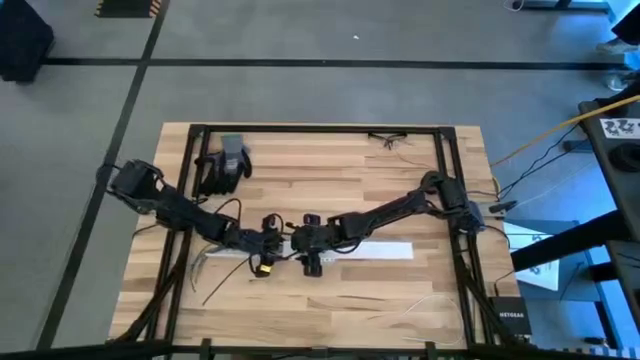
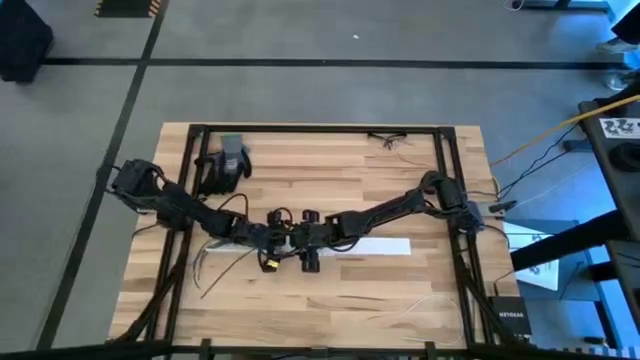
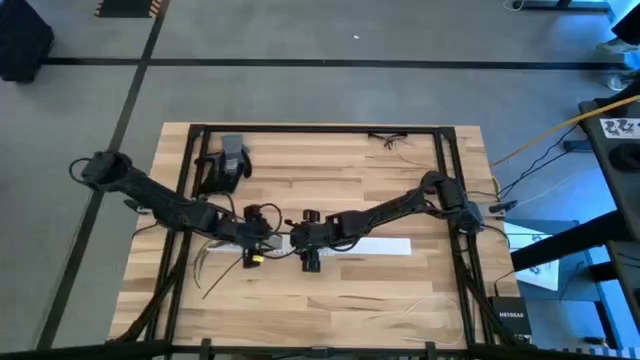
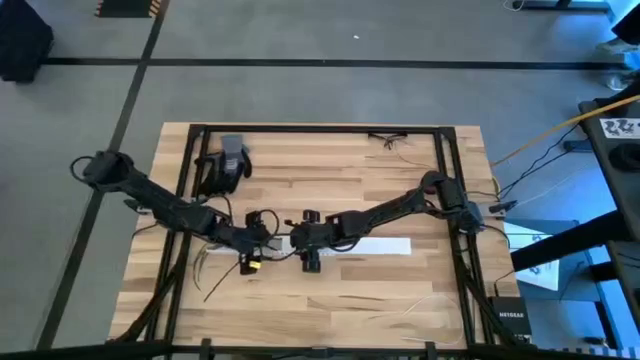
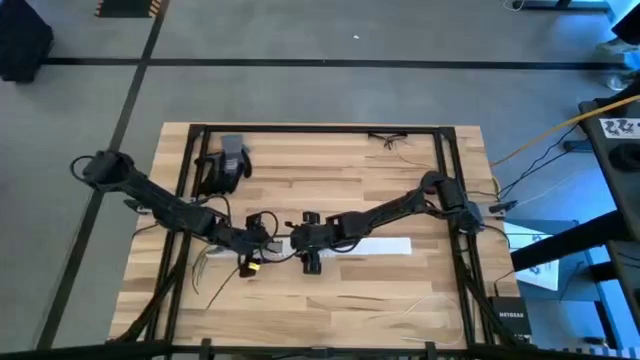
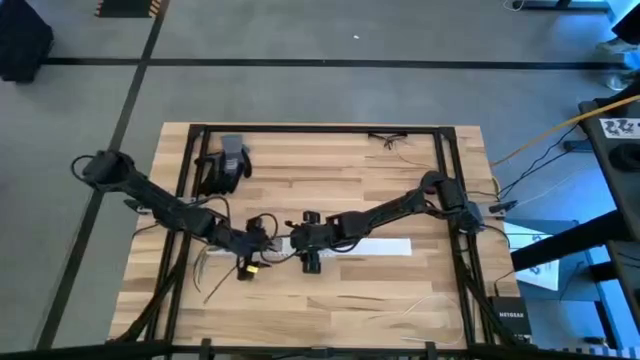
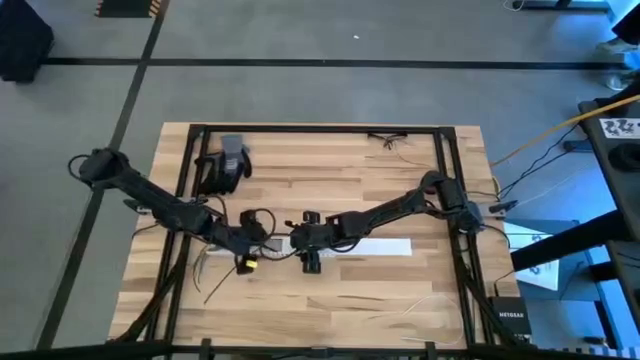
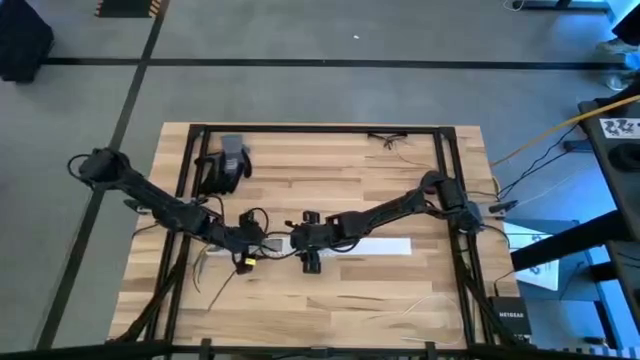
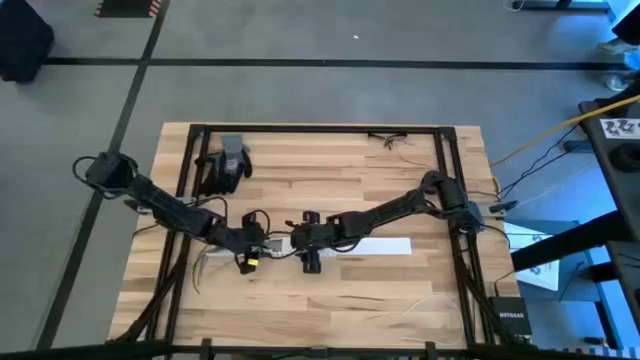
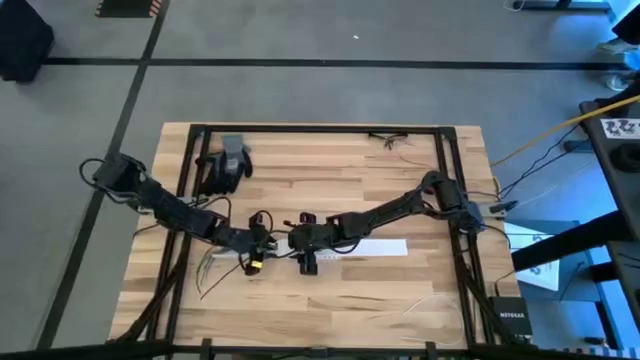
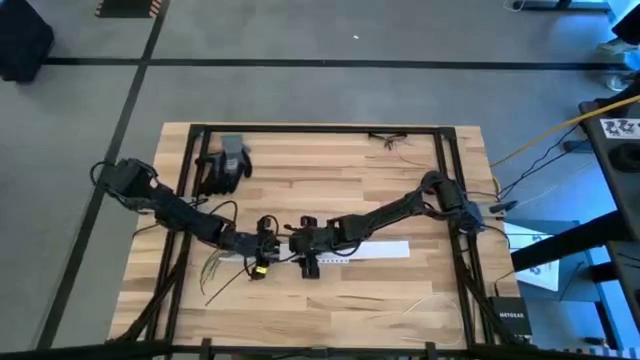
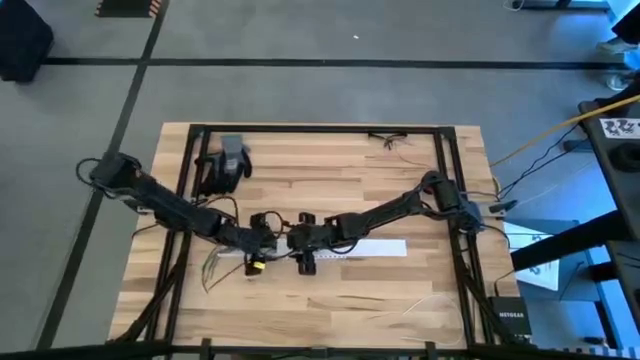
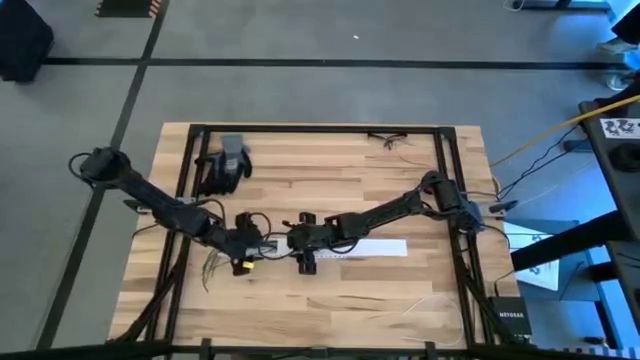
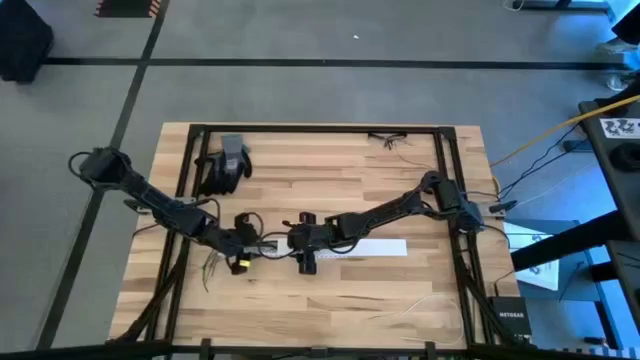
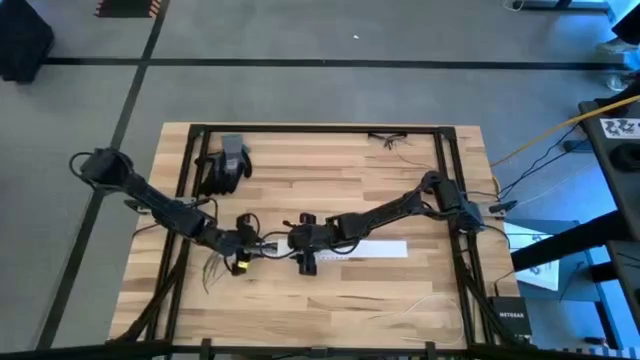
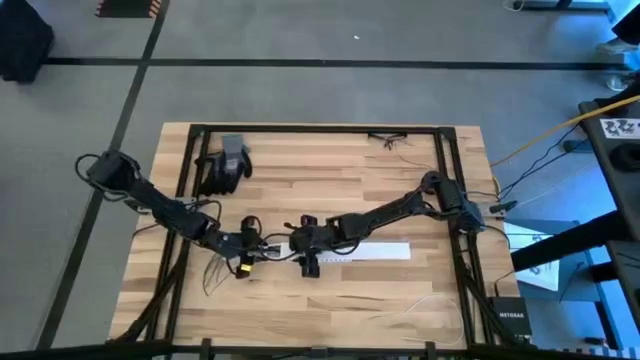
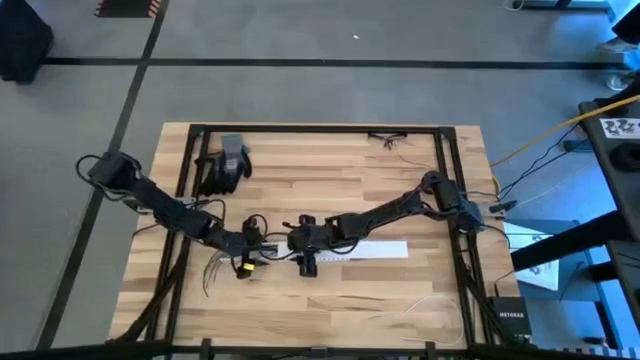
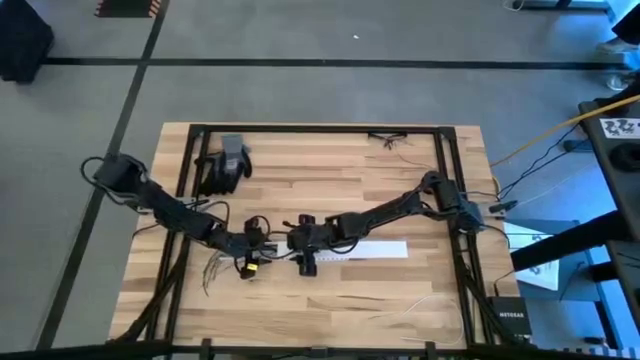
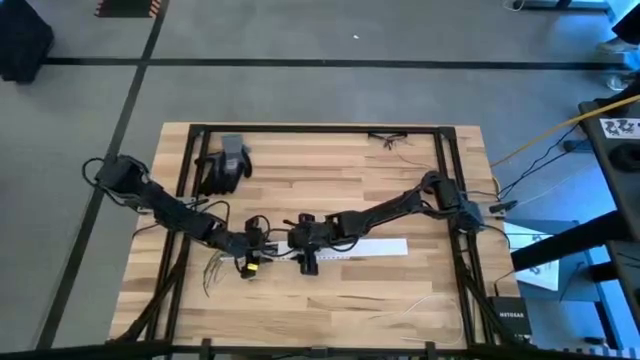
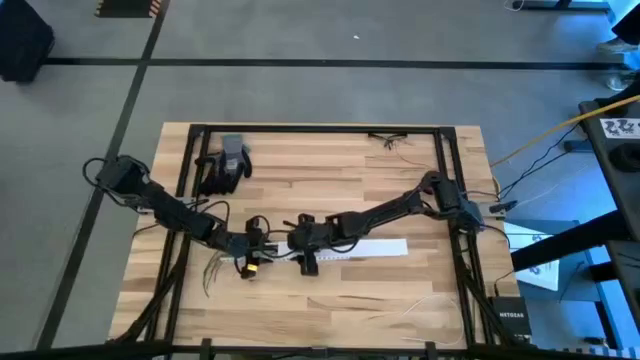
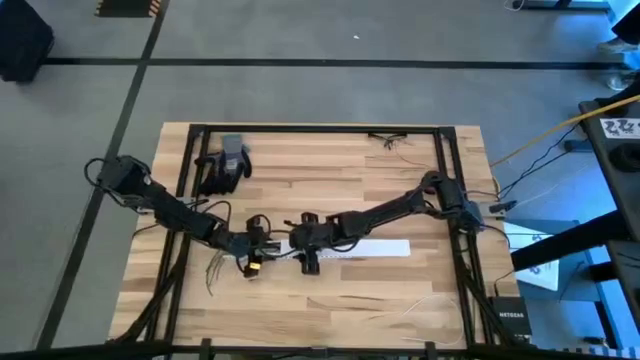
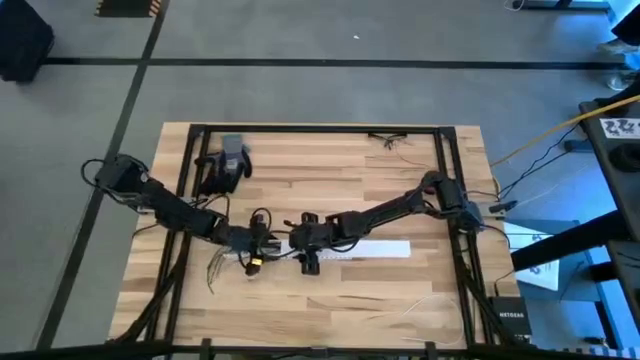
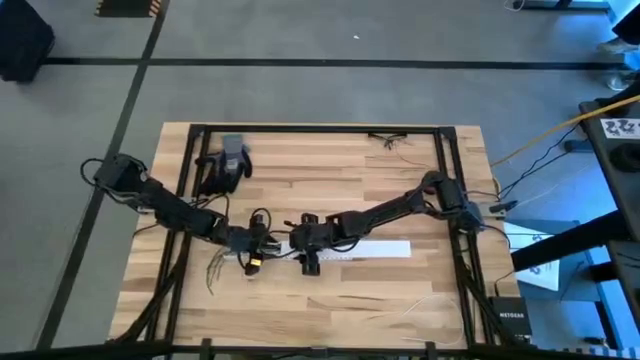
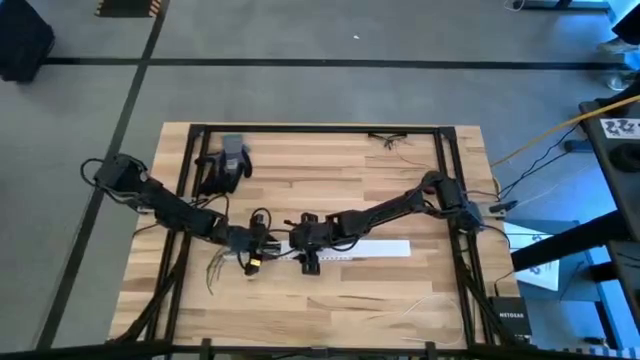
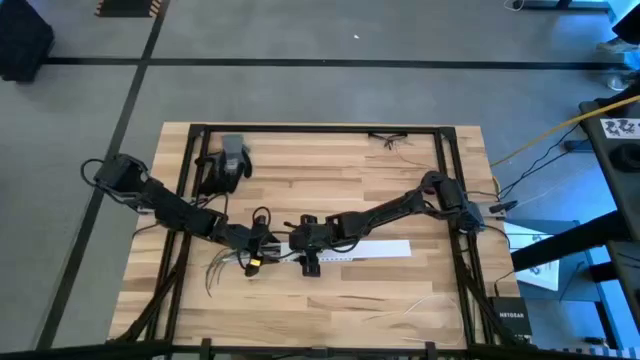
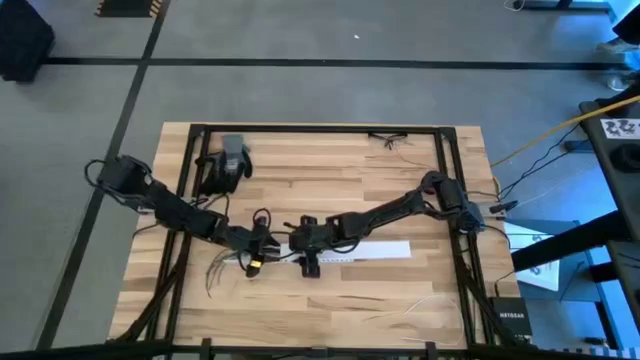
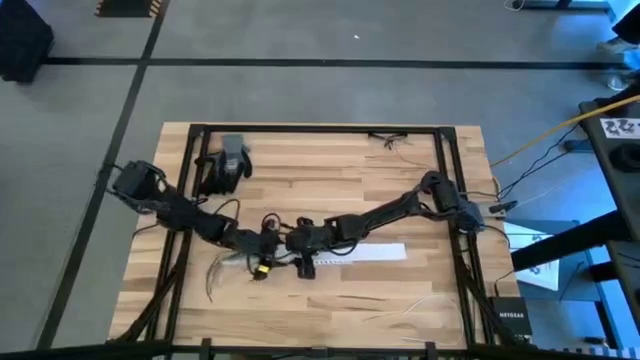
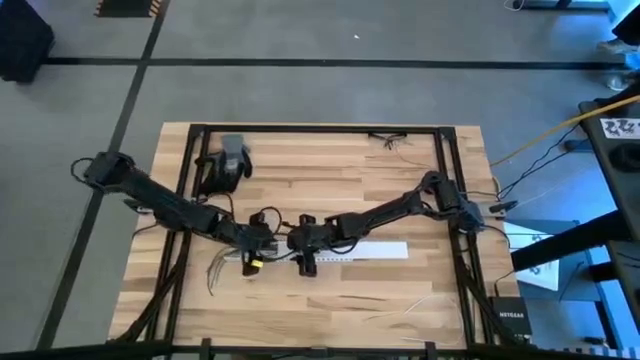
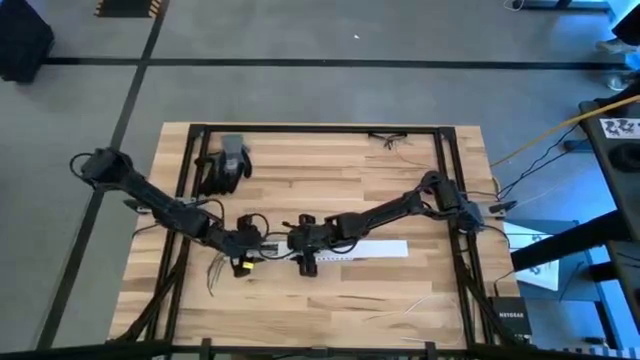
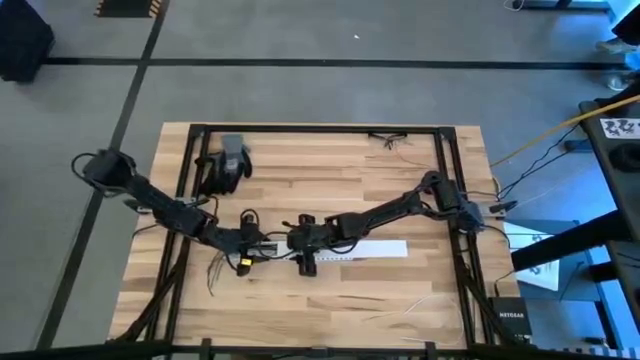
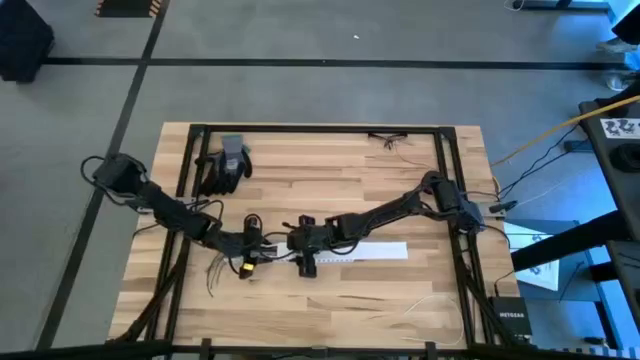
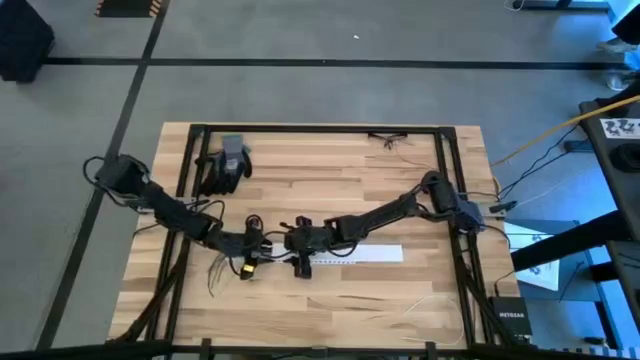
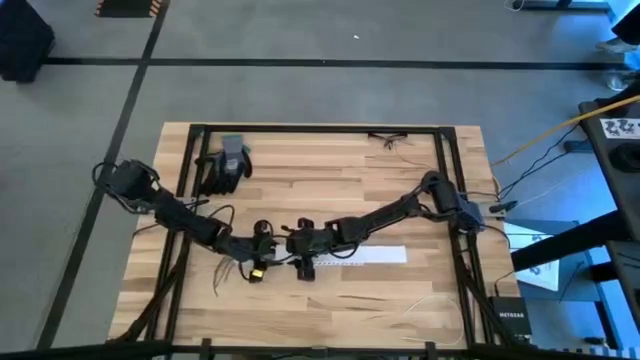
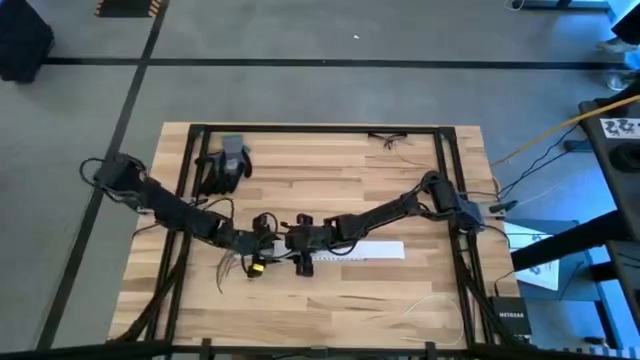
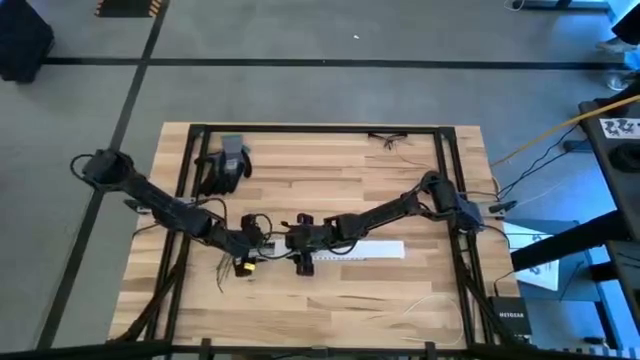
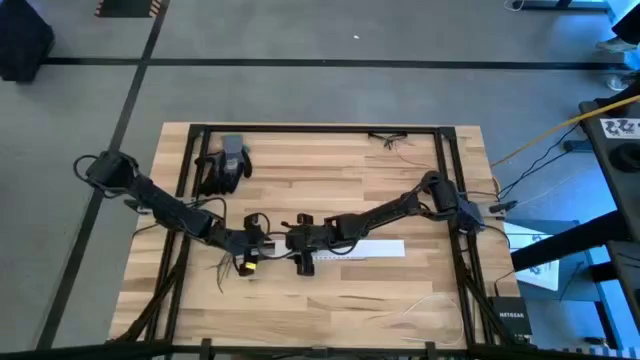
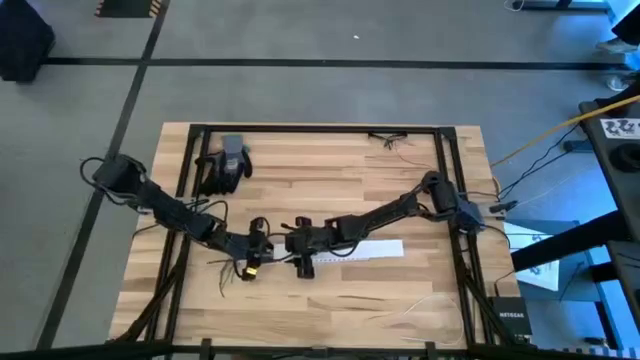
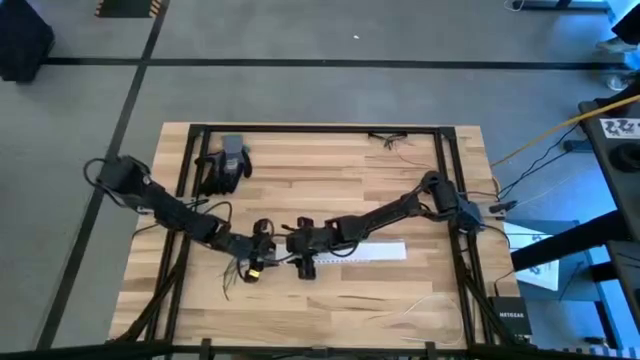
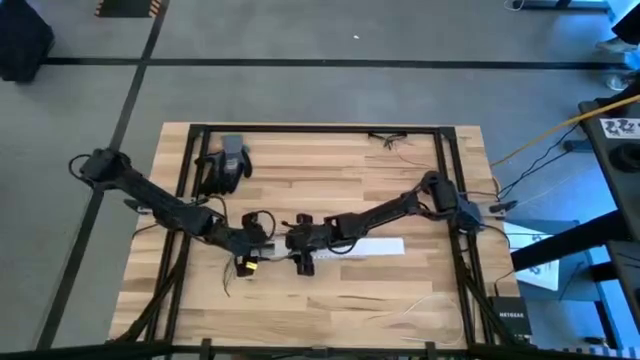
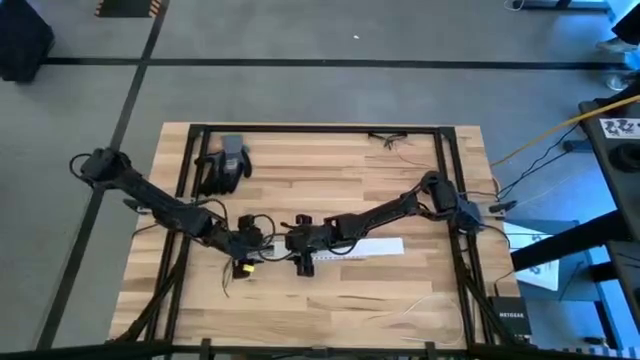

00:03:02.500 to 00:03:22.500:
Task: Ziptie cables
Close the cable duct

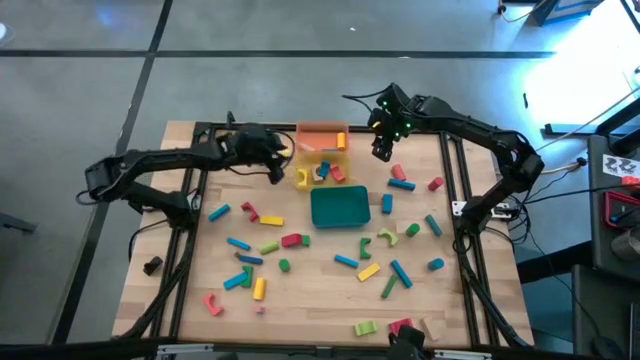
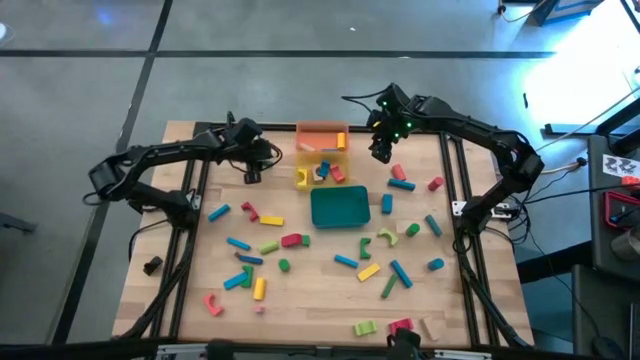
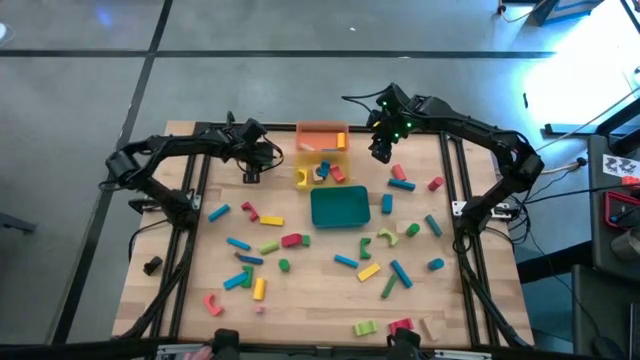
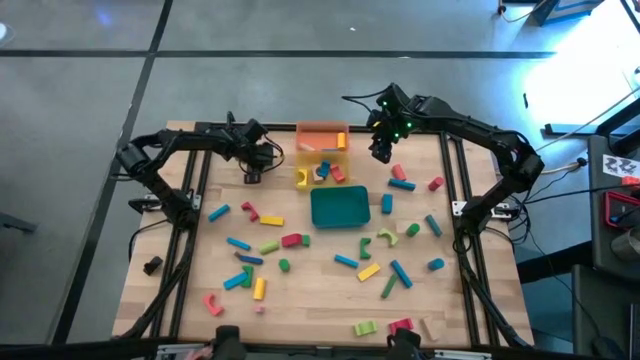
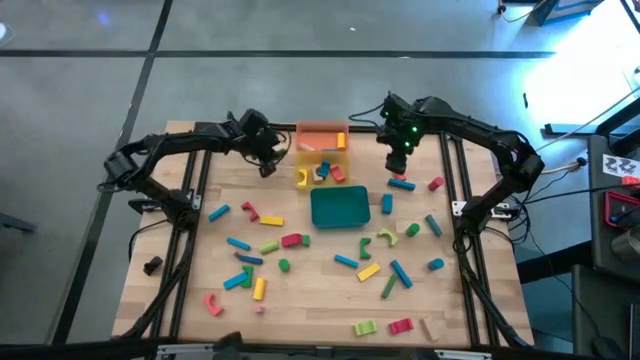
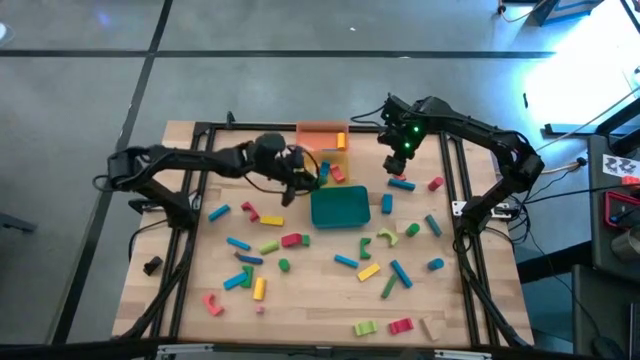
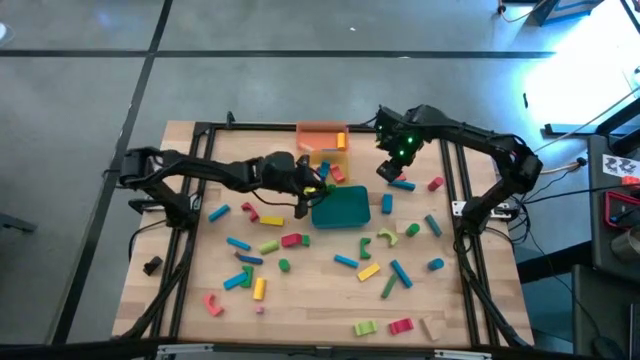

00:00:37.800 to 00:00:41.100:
Task: Sort blocks by size
Put the green rectangular block into the blue bin
